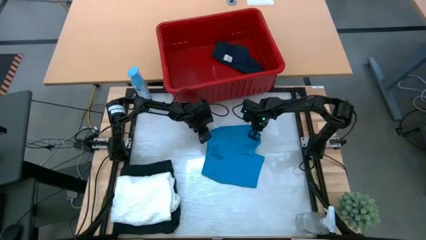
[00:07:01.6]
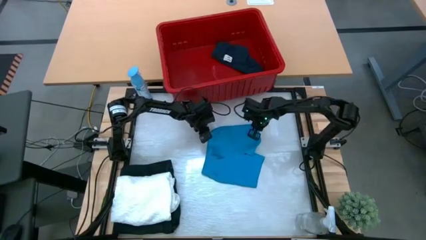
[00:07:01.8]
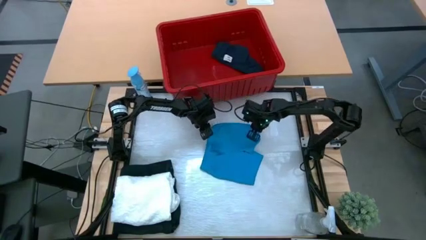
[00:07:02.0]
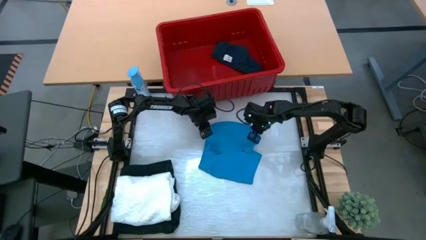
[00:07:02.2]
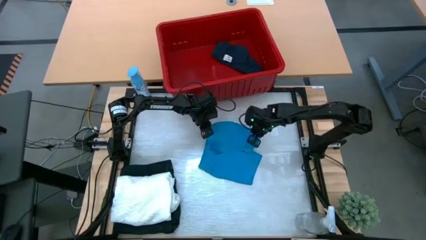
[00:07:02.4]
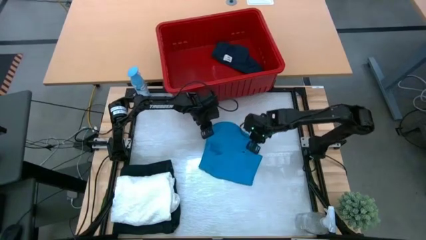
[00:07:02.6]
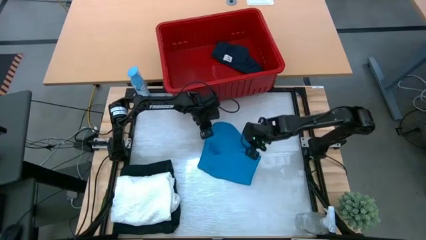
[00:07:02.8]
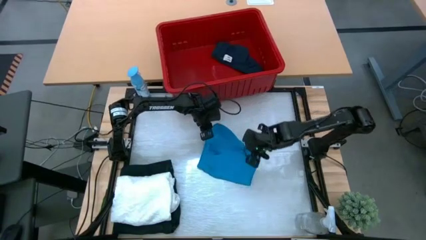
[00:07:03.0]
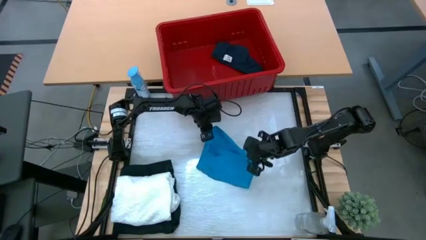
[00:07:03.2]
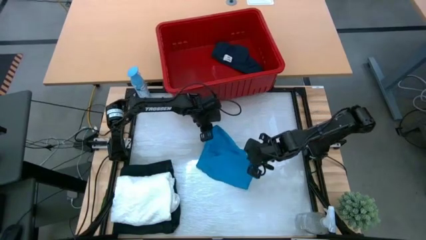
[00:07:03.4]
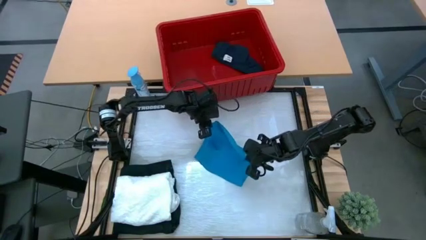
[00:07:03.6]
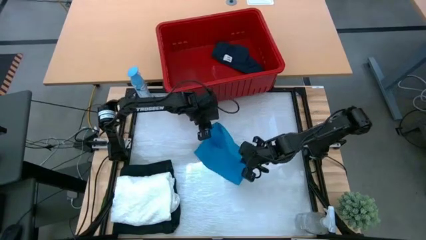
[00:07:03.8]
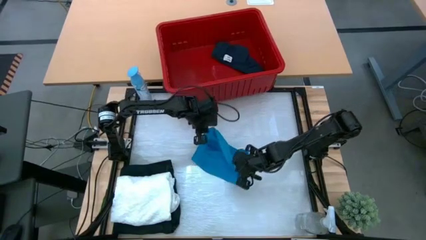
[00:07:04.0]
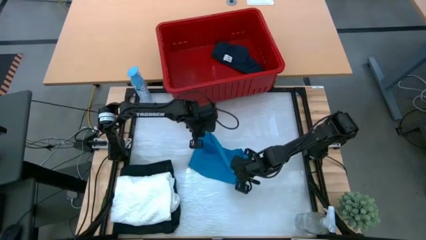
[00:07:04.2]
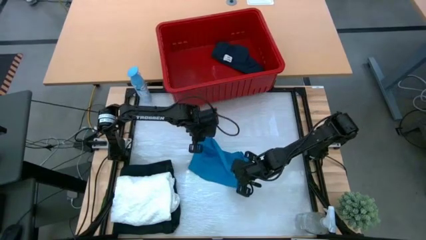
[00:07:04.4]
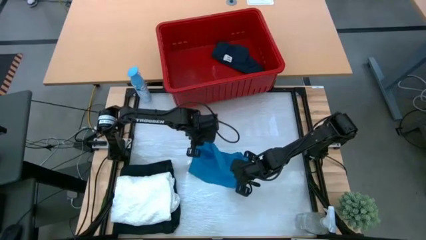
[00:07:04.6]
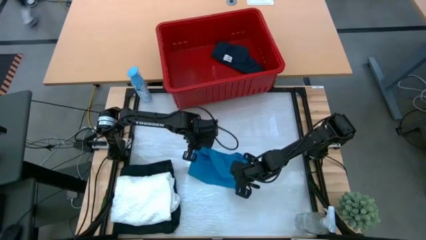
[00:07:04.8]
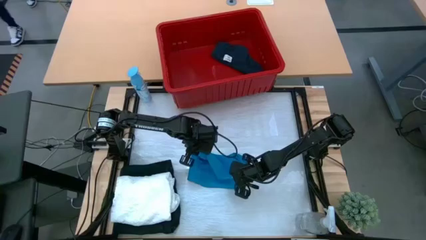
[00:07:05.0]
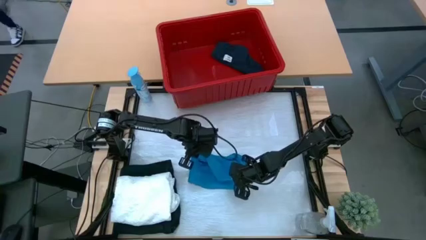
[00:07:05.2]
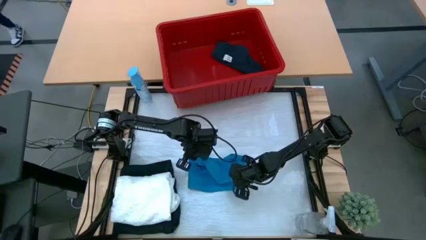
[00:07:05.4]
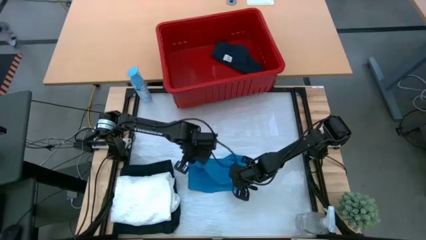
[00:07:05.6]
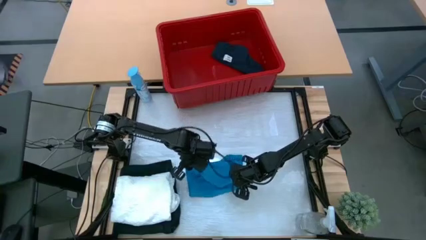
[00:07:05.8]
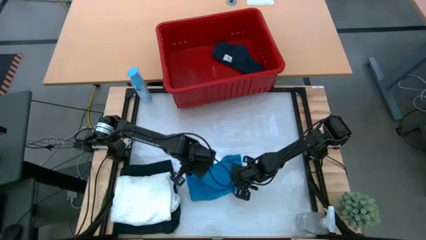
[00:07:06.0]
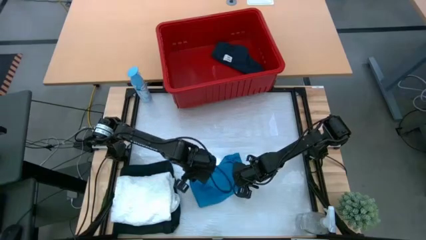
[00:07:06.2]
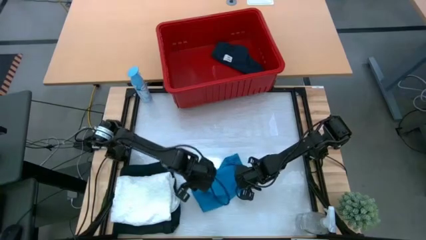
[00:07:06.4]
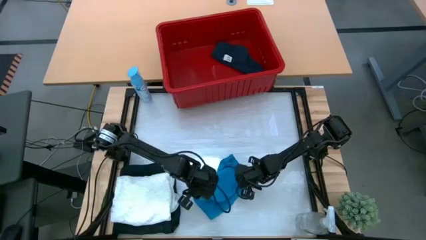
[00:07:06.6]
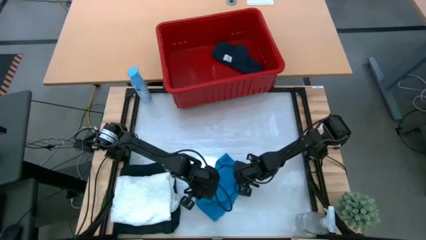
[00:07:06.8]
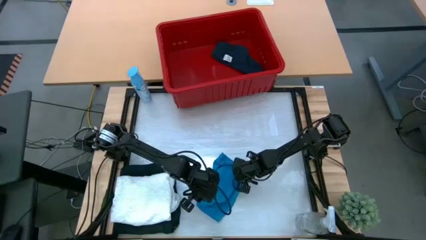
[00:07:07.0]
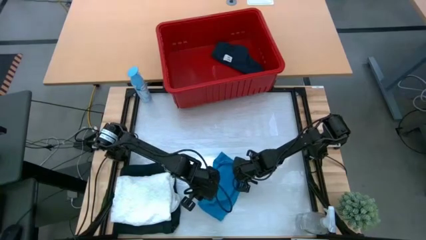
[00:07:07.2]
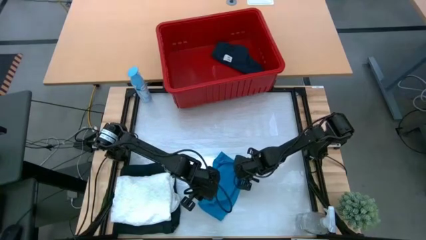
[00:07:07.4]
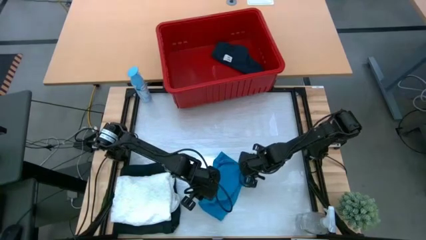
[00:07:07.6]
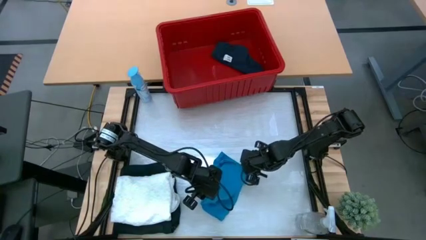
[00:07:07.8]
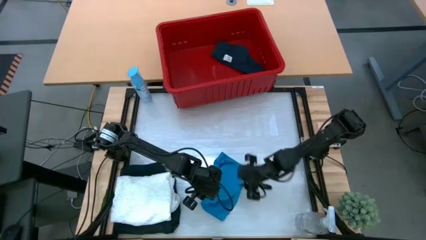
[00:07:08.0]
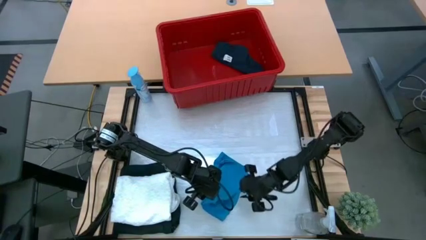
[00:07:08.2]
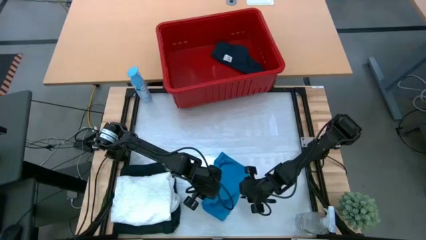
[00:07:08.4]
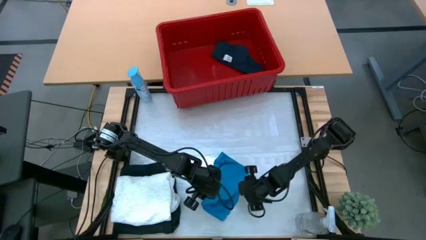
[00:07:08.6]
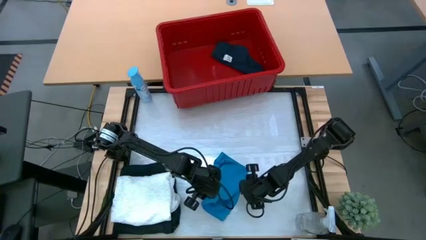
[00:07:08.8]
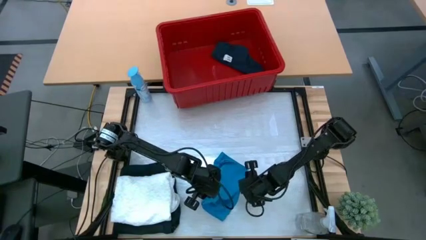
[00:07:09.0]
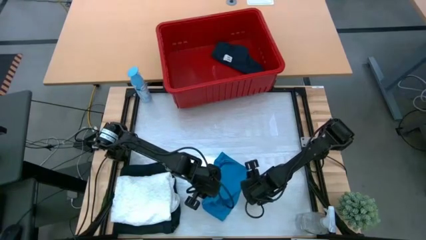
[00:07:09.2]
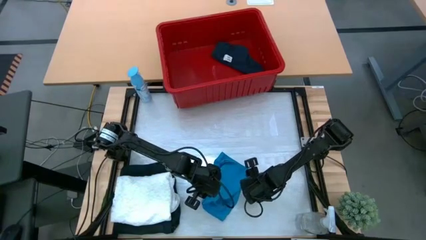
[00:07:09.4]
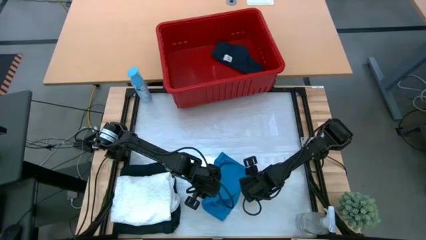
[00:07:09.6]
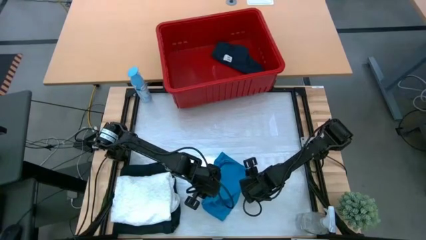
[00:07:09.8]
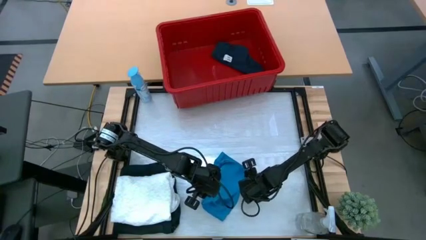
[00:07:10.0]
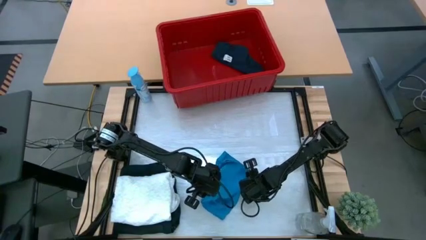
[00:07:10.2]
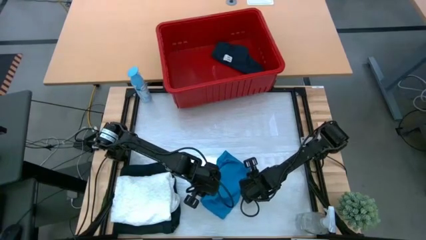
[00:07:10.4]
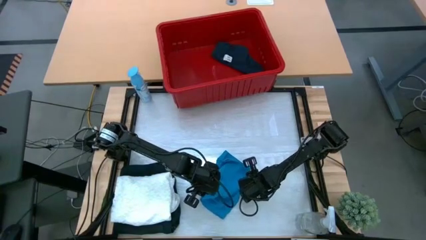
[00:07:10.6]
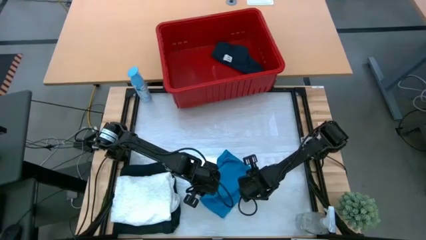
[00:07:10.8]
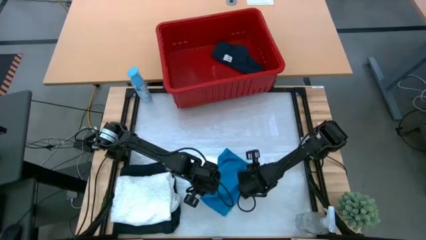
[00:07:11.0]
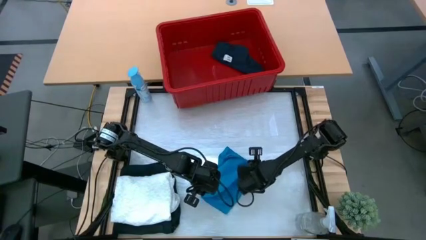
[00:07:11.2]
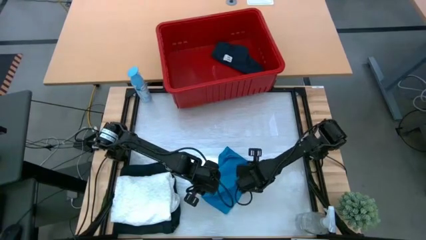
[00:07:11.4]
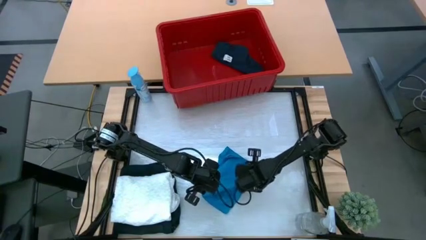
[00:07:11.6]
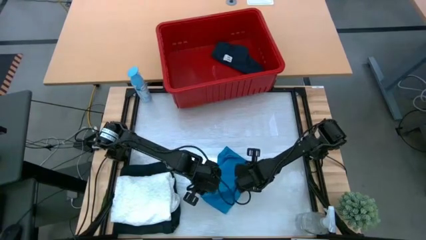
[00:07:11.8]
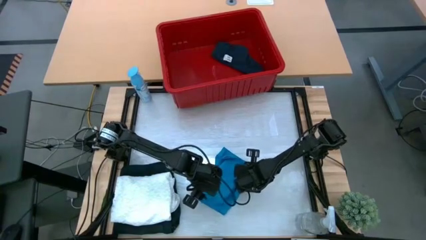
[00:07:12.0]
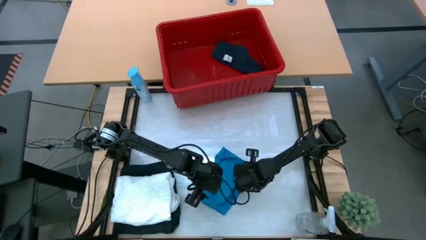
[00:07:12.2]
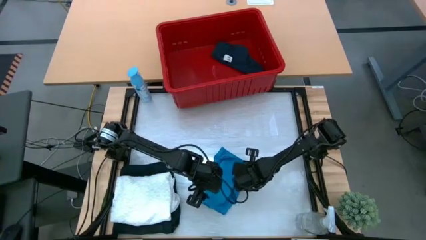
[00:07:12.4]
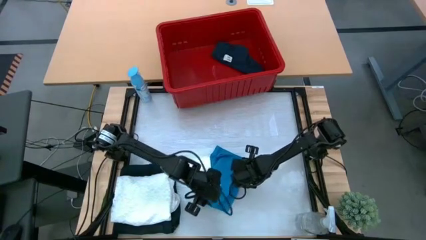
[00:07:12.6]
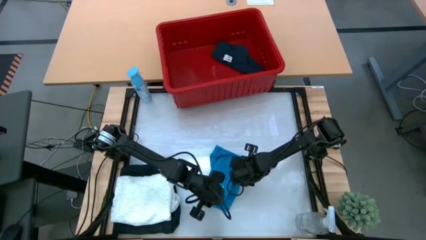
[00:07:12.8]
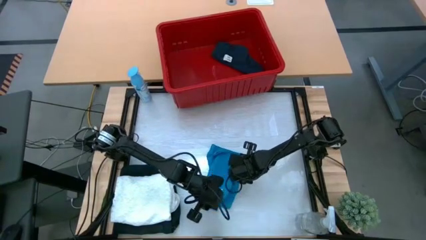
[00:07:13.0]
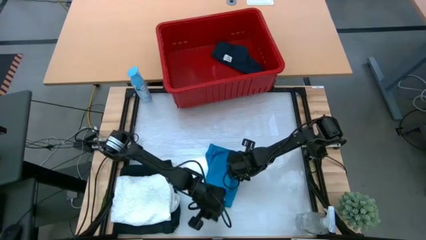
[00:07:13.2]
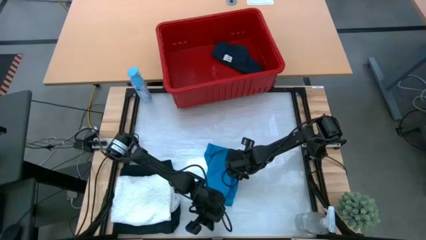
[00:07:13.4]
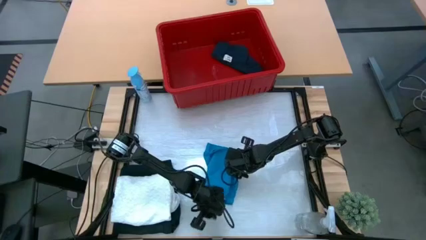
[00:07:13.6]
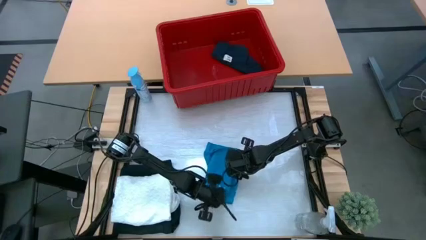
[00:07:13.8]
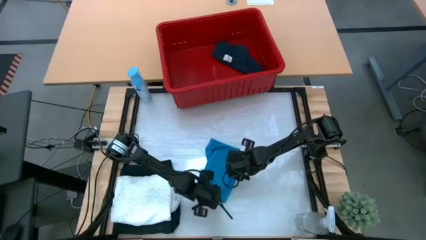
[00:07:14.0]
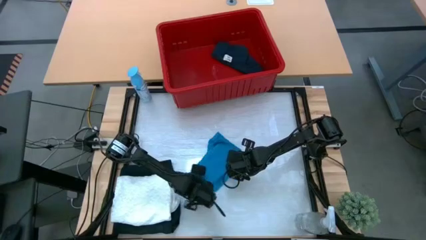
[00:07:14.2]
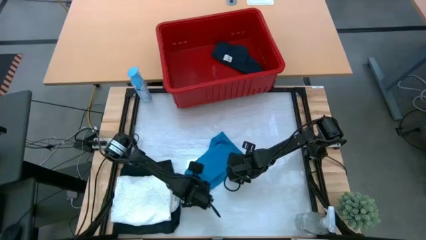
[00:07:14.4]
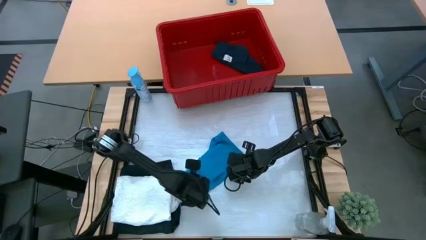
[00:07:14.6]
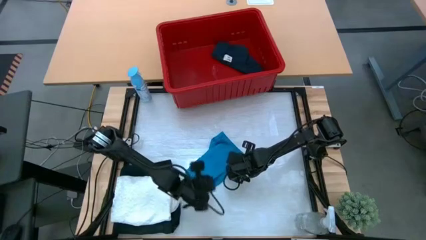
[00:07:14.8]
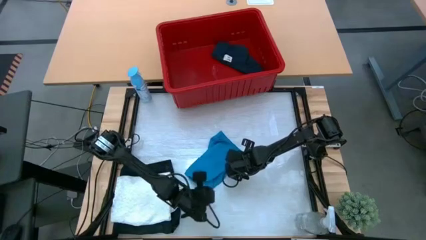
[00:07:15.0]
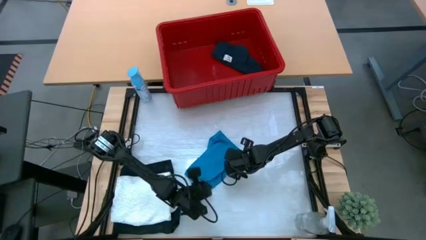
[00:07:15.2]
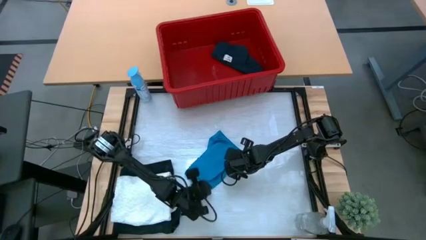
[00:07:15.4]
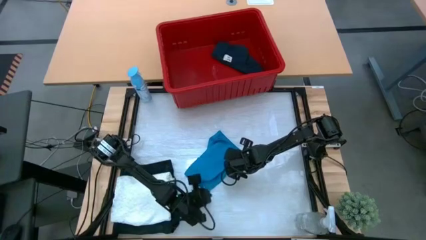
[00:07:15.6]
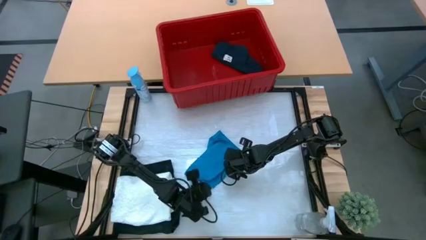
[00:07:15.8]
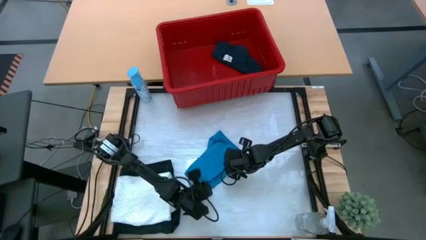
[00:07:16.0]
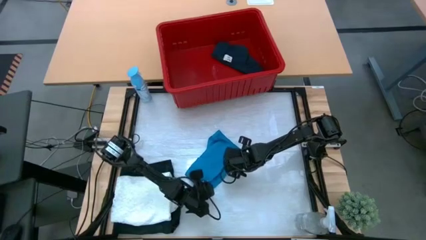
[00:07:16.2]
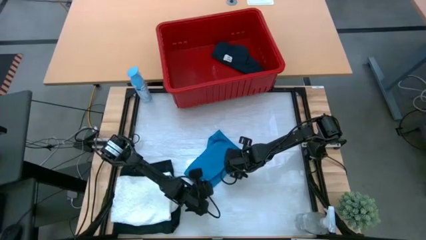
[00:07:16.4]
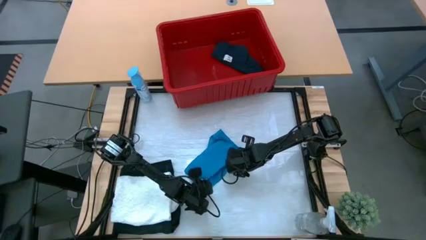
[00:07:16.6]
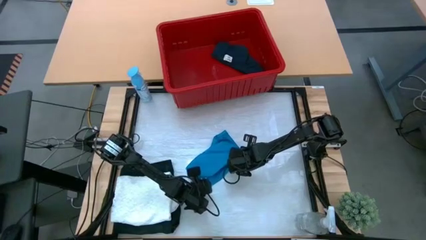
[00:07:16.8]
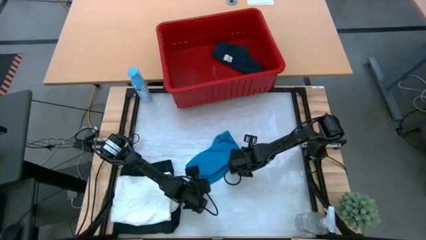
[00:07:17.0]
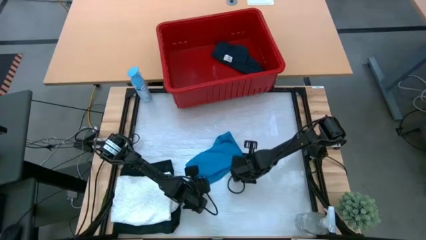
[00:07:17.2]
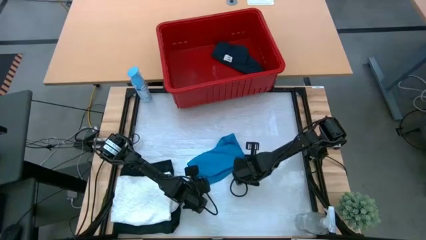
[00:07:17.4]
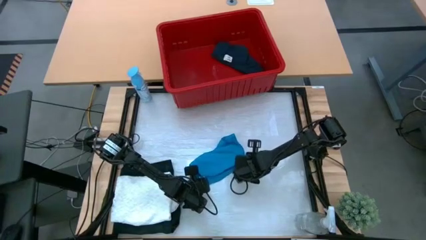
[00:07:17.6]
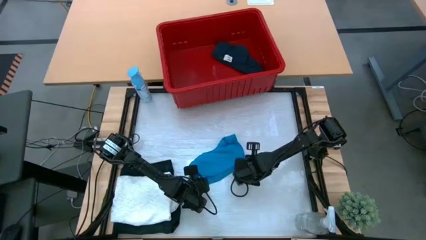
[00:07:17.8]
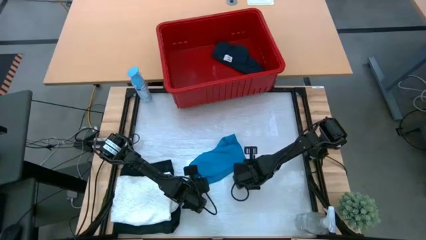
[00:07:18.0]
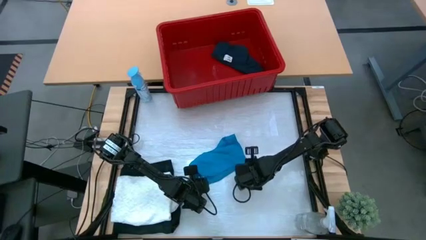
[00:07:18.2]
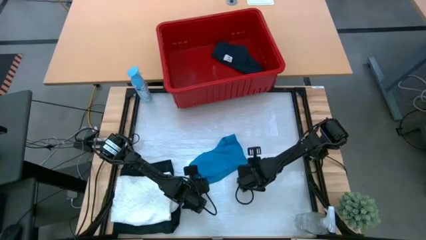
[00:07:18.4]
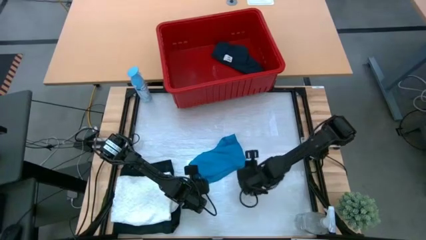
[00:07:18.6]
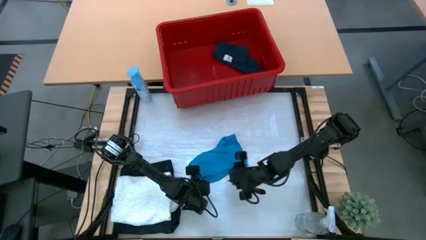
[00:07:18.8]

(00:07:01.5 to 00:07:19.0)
Task: Fold Laundry from Bin
Fold the blue shorts from the red bin
